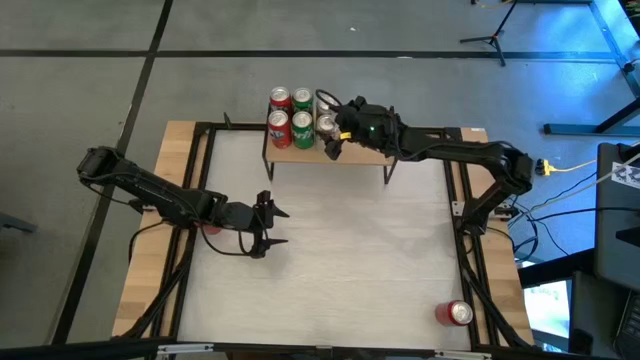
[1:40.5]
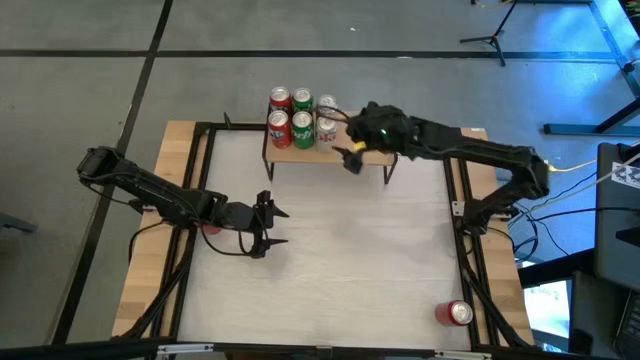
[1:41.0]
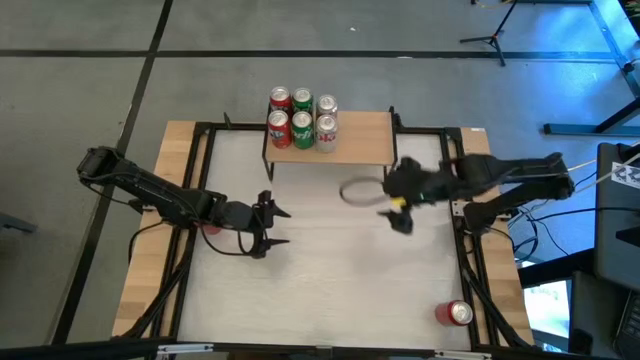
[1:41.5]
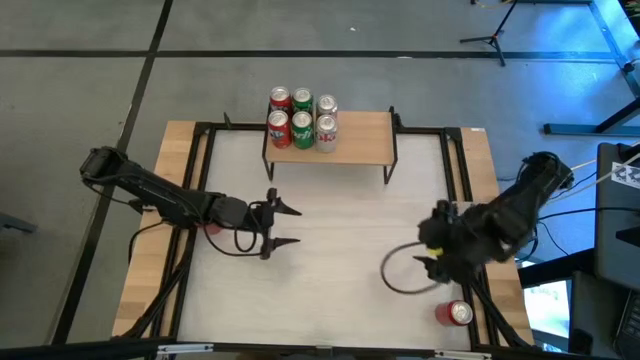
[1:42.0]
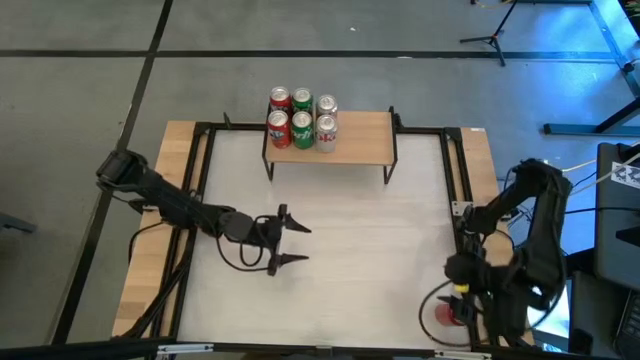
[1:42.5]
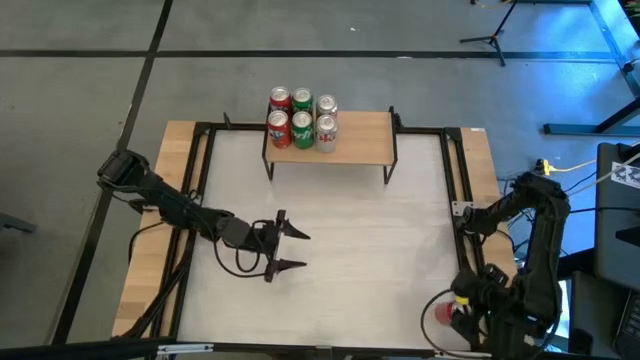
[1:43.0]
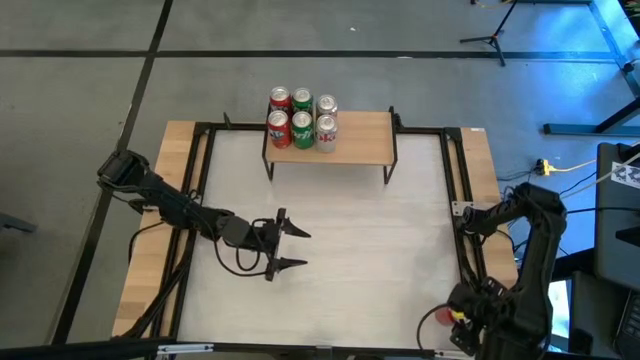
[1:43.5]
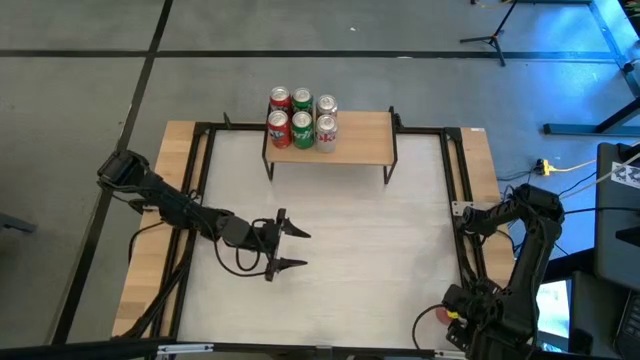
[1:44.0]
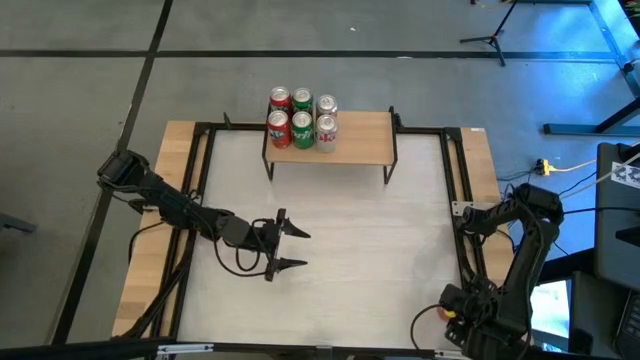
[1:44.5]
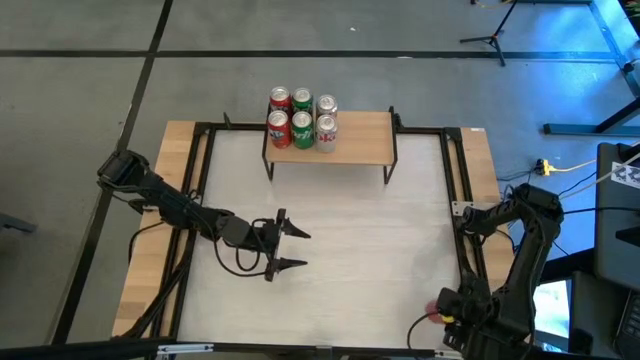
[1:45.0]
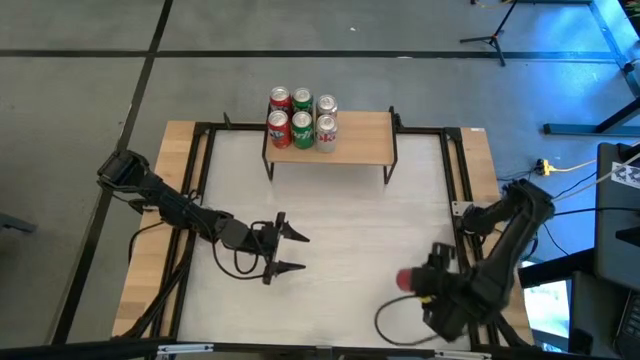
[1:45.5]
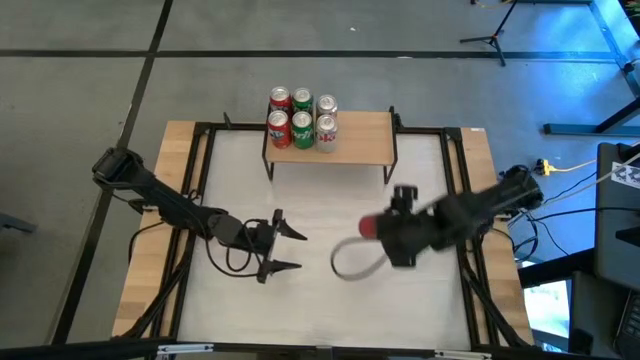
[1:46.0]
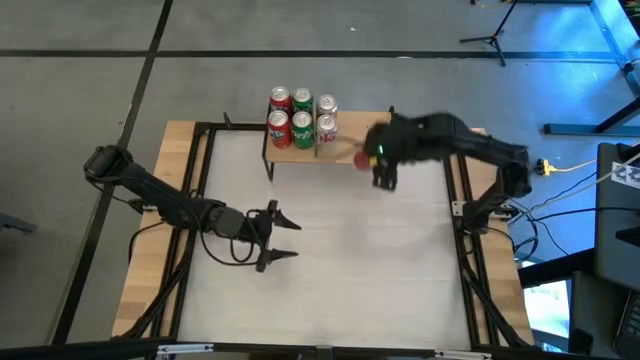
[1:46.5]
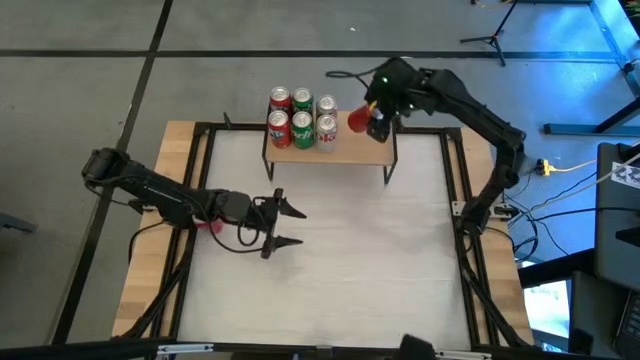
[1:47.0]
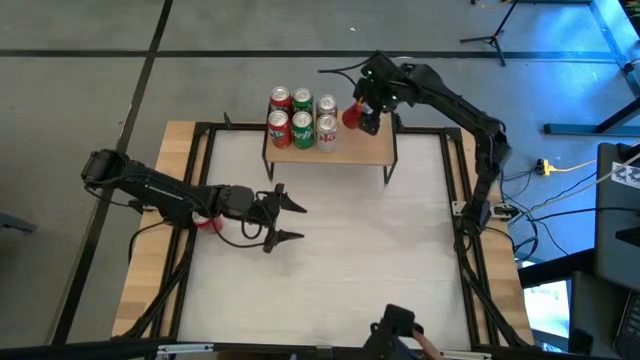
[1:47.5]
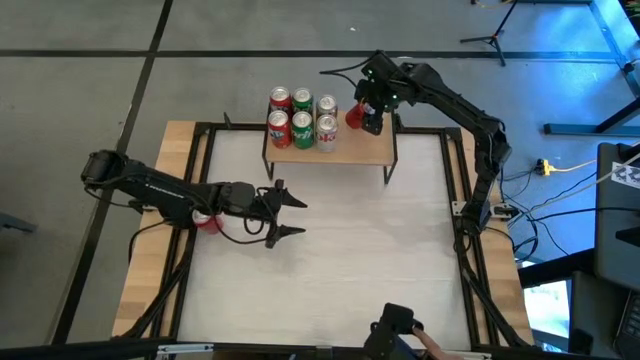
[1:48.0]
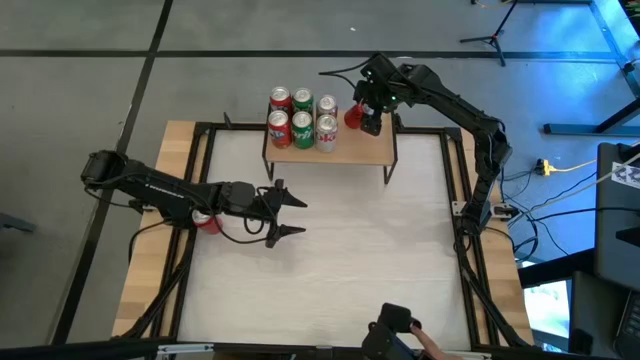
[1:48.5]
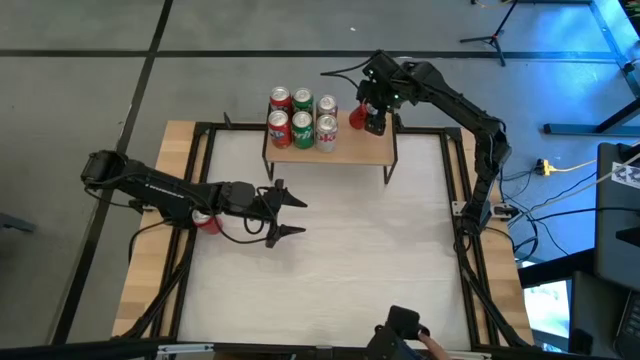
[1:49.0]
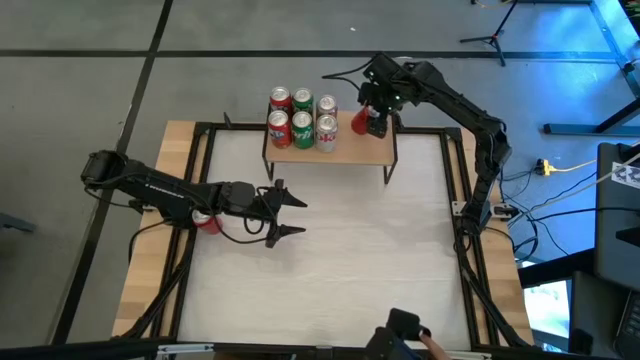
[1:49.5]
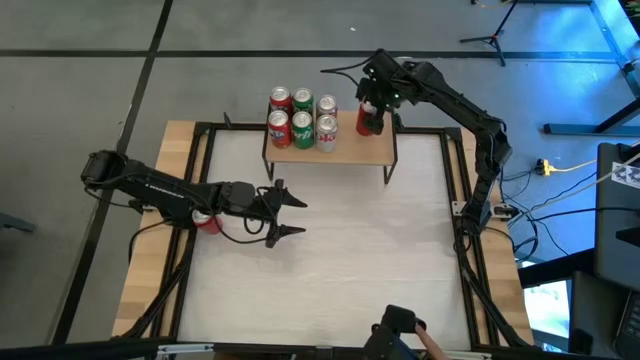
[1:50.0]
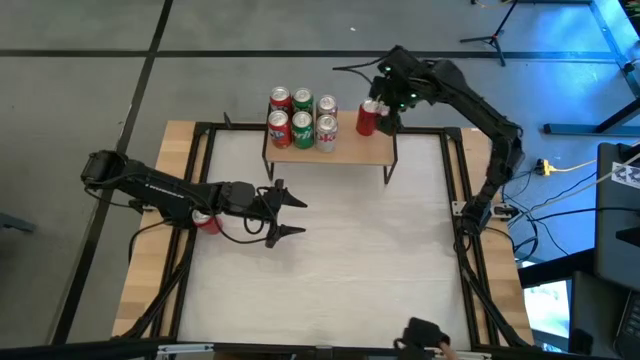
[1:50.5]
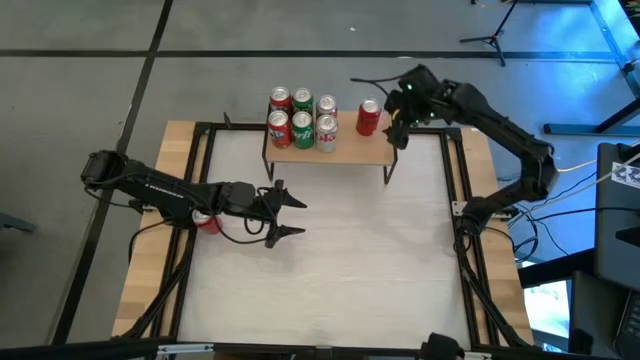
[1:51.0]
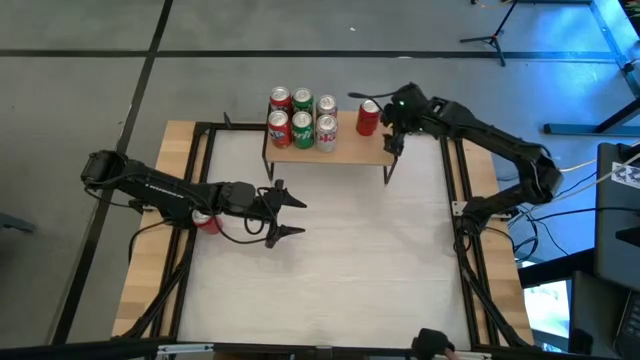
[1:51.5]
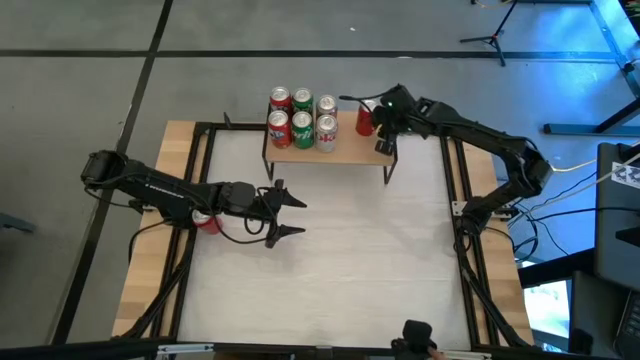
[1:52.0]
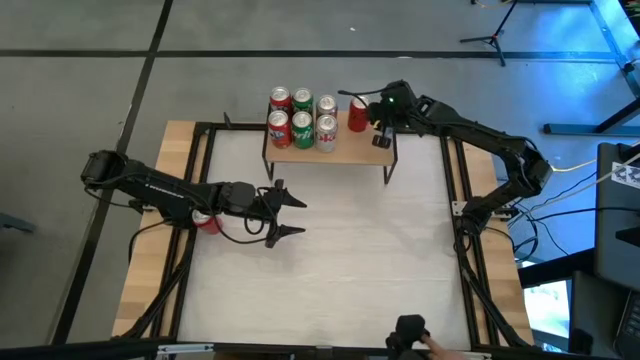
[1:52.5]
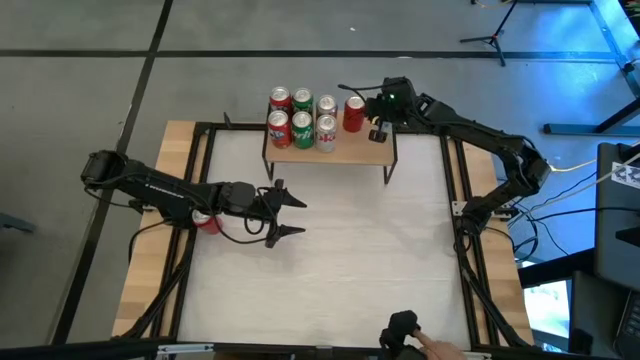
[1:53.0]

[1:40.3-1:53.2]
Task: Place canned beverage on shelf
Put the bottom red black soda can on the shelf

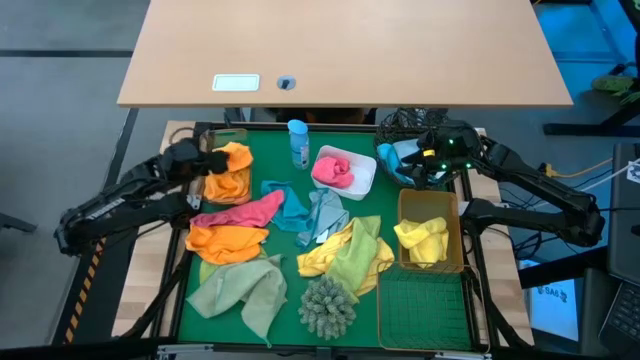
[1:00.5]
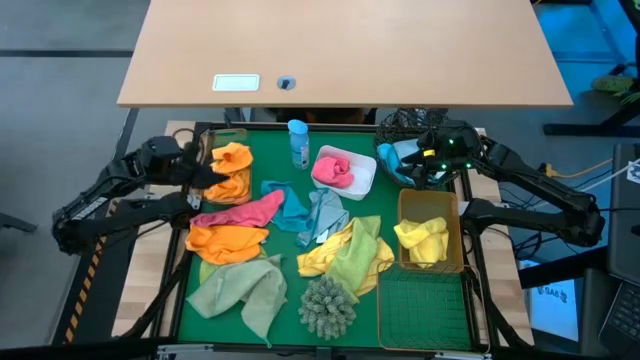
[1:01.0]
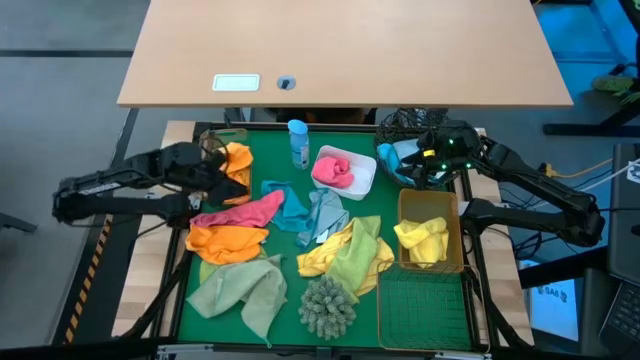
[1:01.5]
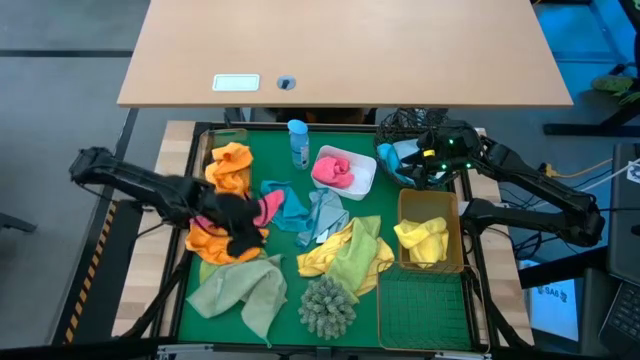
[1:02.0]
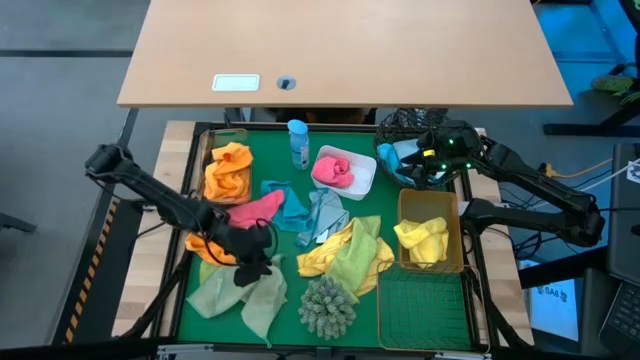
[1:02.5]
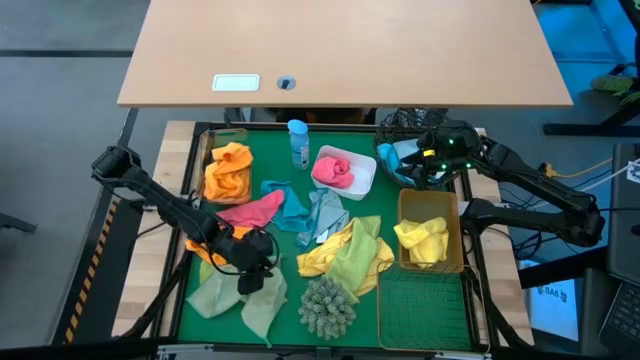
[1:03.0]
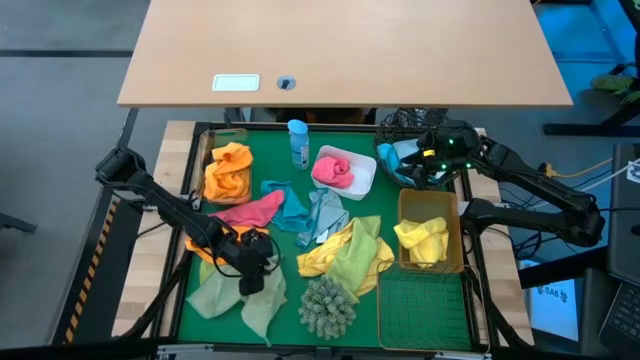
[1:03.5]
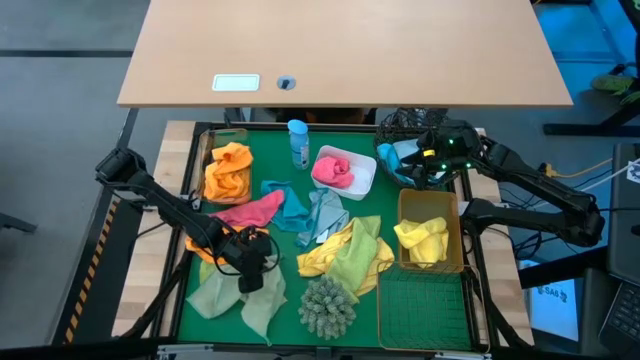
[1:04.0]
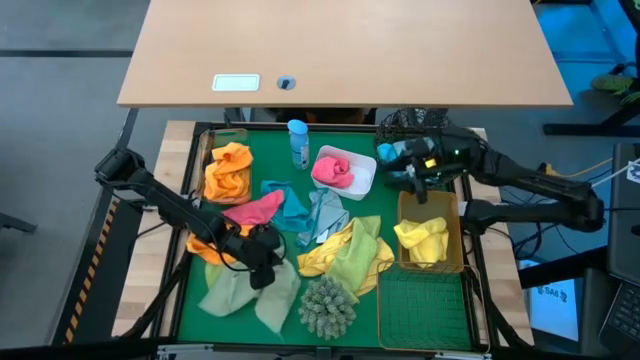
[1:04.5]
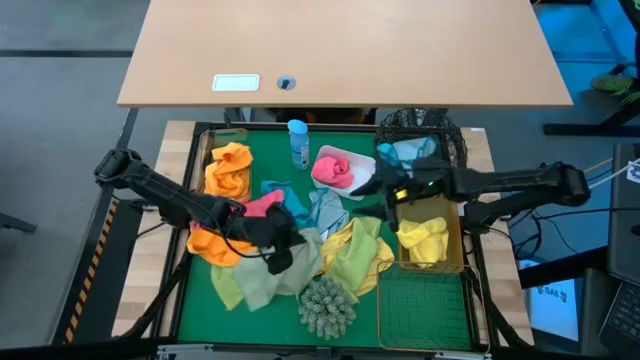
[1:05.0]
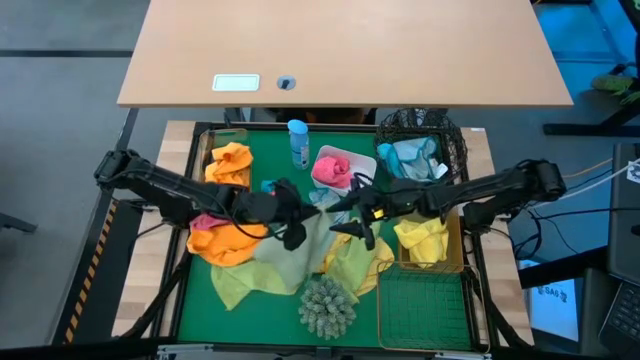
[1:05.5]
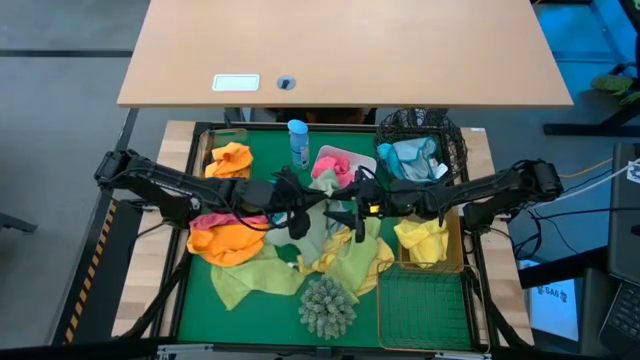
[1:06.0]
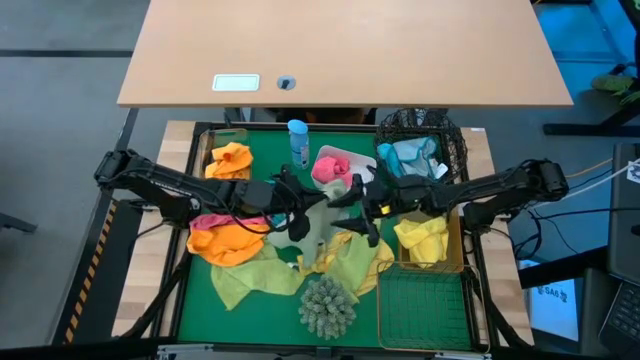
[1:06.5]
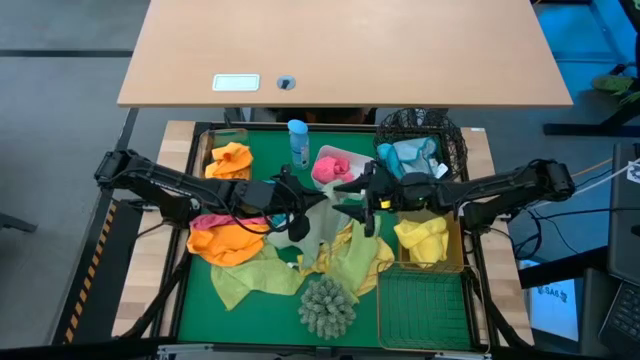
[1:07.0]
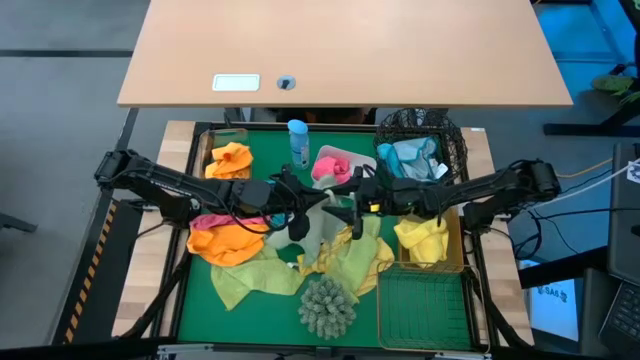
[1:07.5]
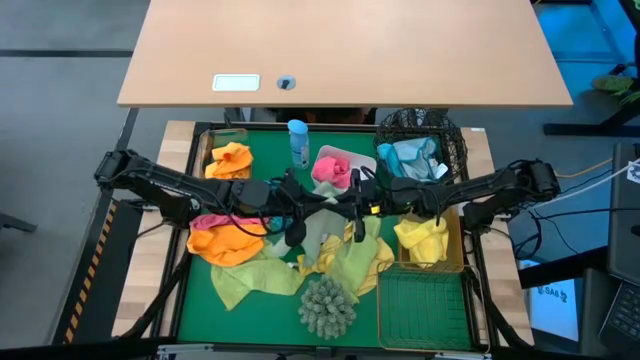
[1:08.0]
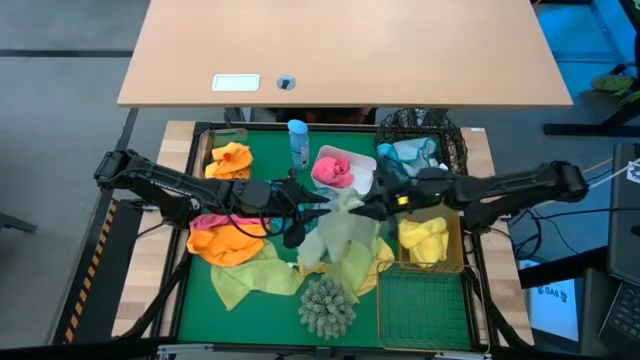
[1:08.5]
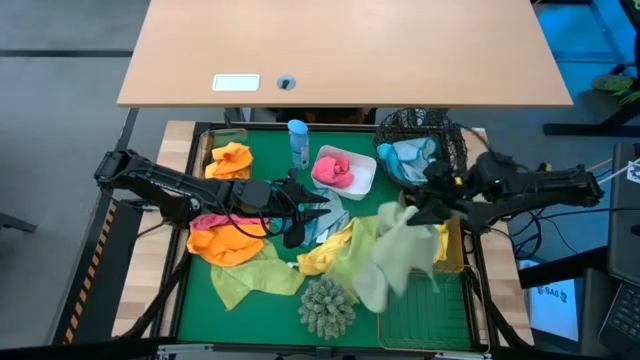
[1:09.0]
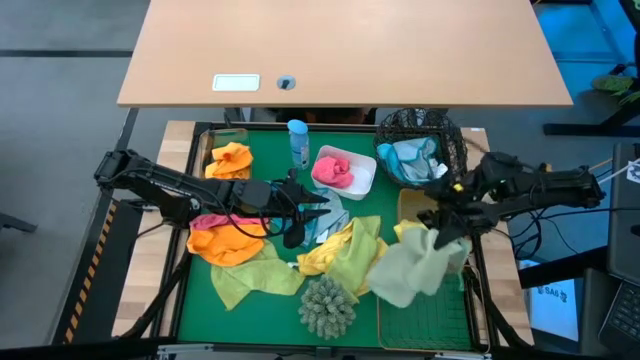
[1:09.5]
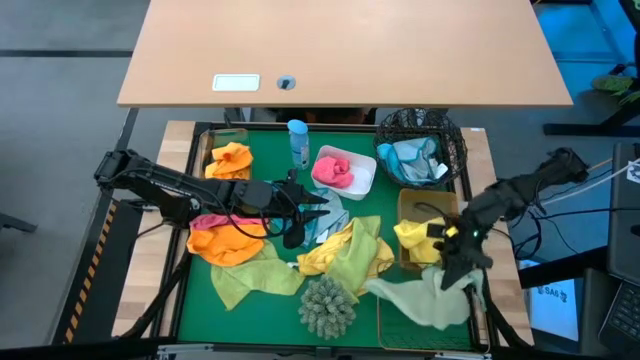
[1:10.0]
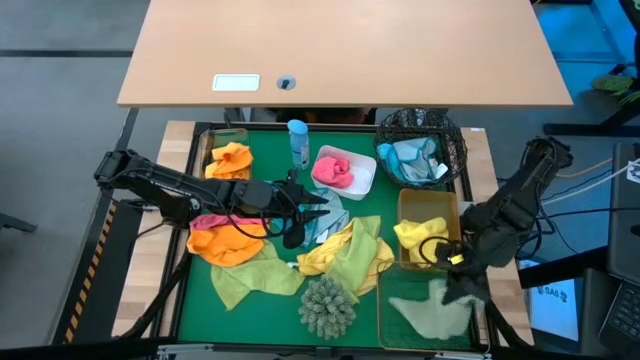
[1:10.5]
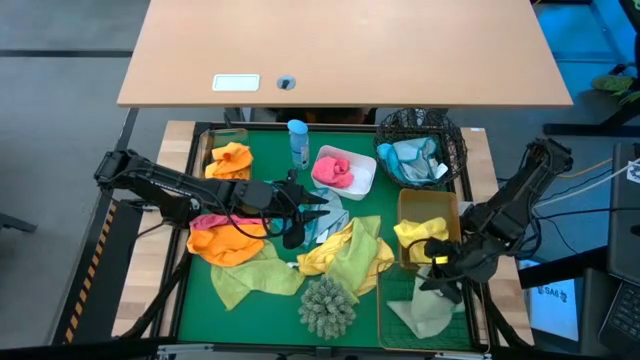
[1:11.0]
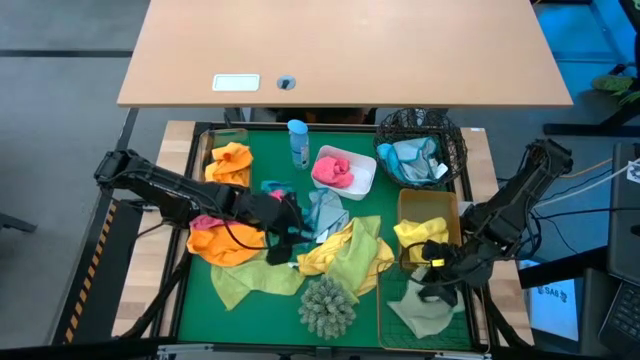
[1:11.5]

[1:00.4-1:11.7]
Task: Sort microfiber towel by color & place in baskets
Put the green microfiber towel into the rectangular wire basket
